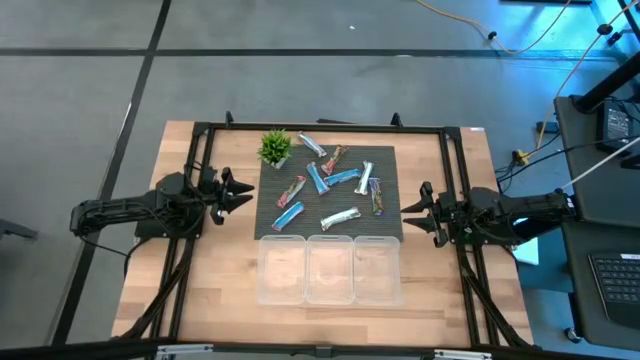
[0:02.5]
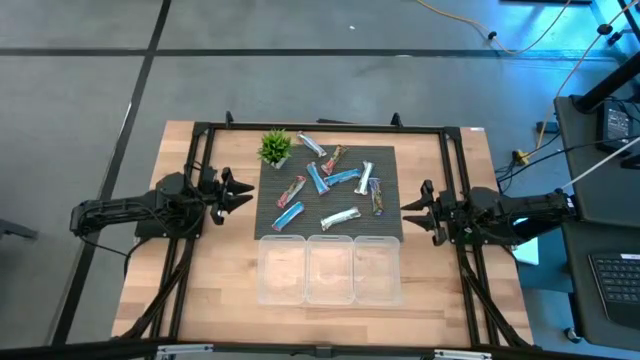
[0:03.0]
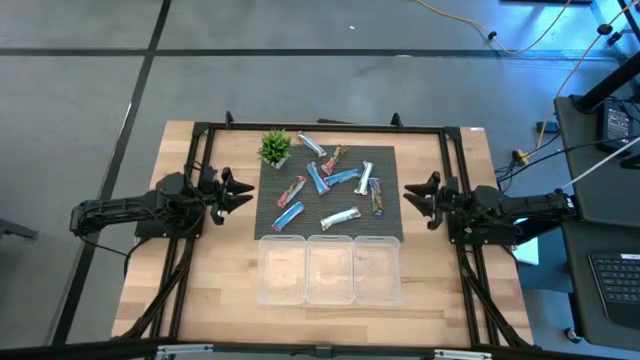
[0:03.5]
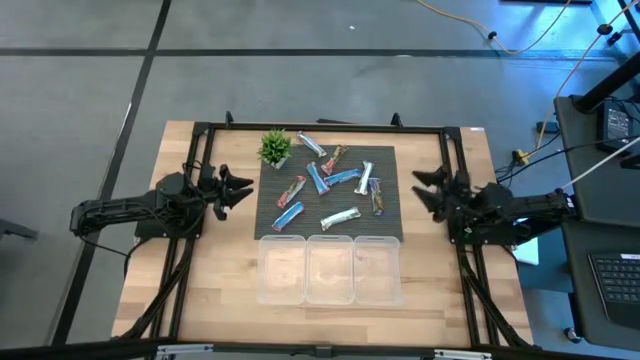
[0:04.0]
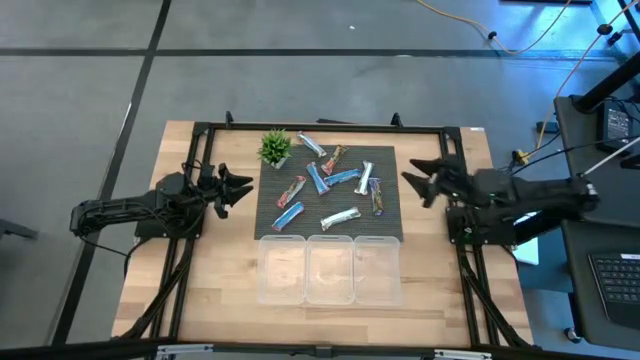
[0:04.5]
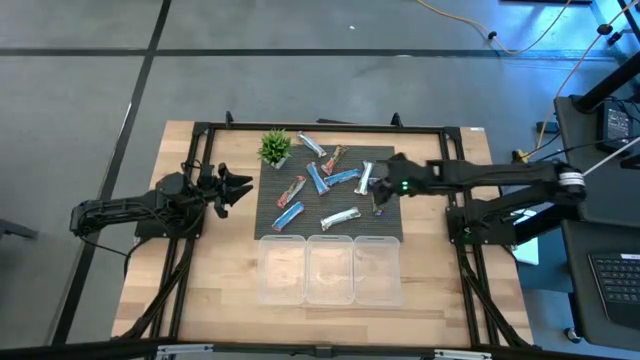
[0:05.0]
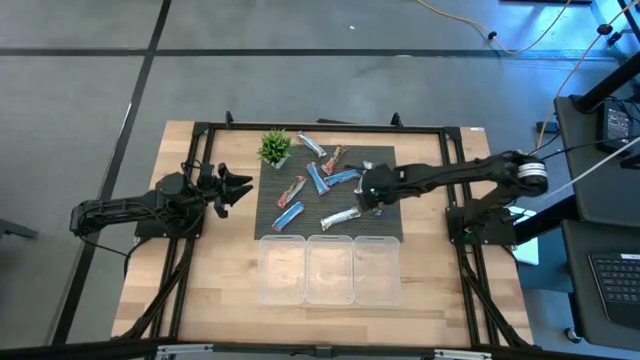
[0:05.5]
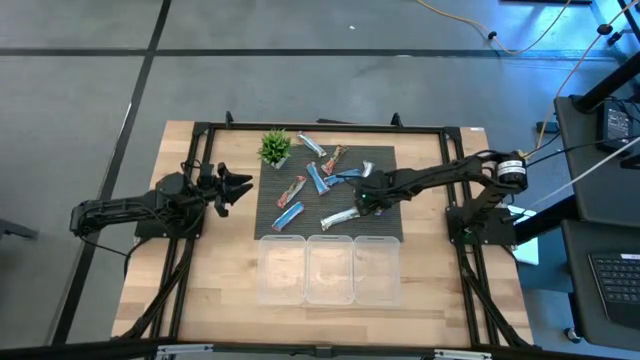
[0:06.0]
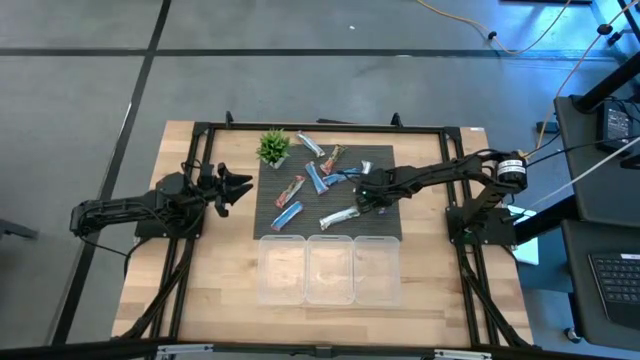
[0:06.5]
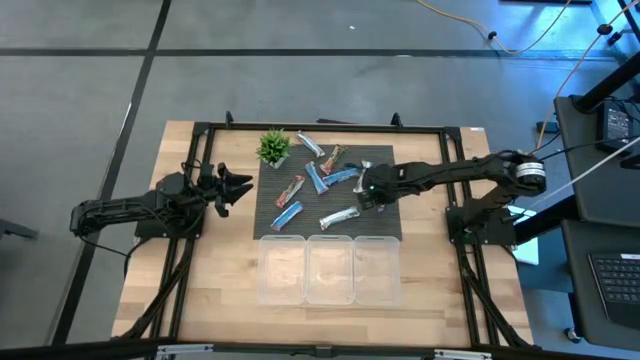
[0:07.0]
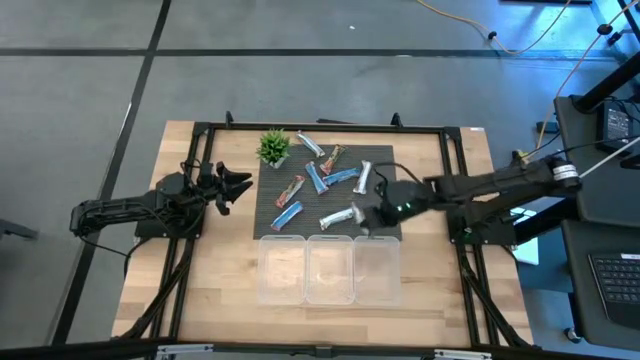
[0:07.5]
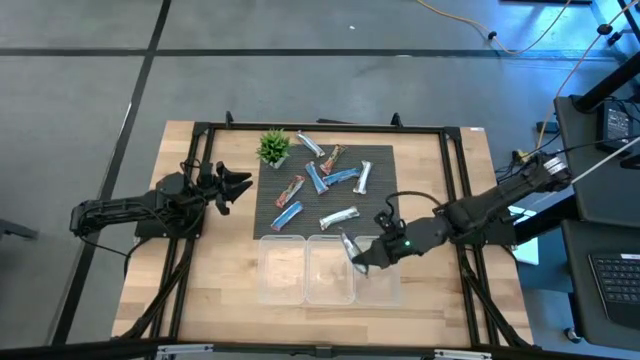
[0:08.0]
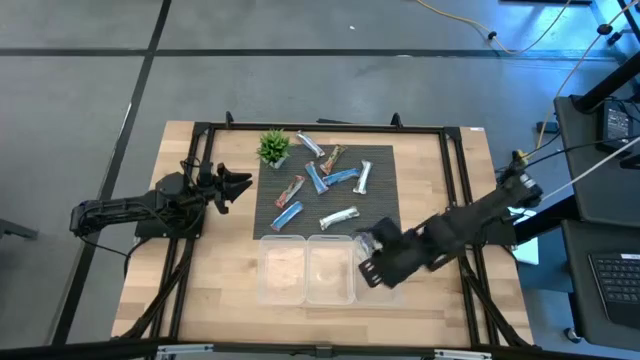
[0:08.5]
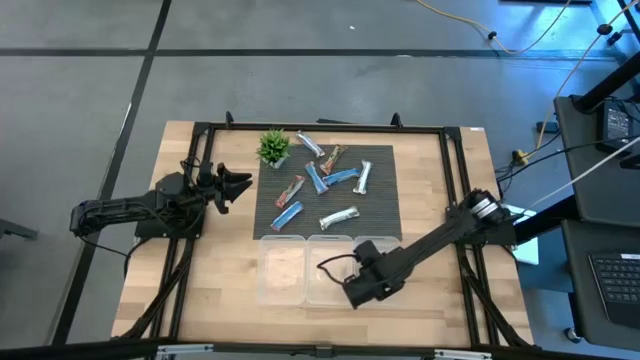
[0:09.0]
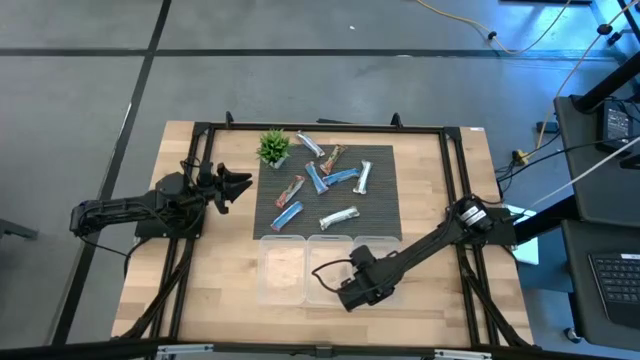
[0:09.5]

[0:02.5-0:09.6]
Task: Pick and place Granola Bars by type
Put the blue granola bar into the right transparent bin

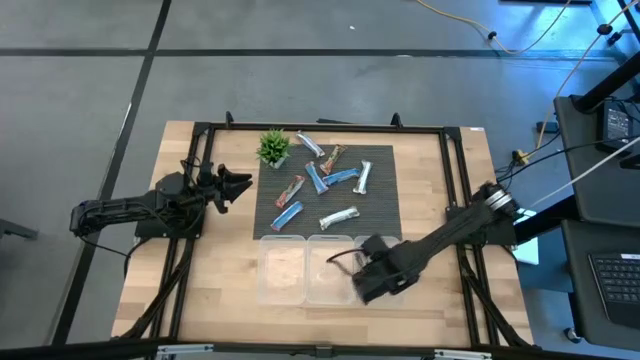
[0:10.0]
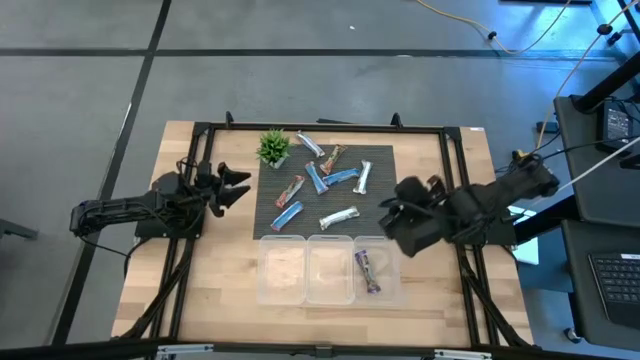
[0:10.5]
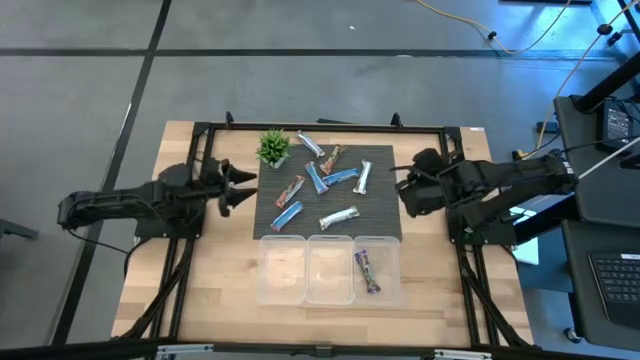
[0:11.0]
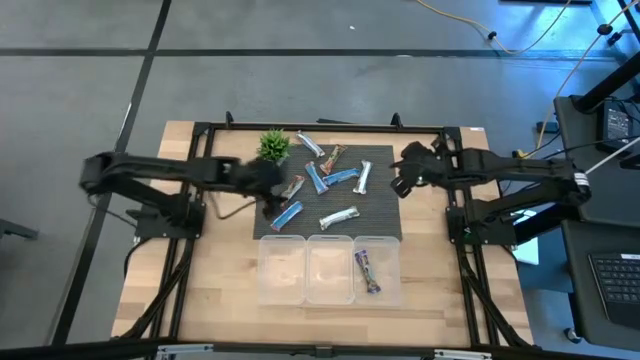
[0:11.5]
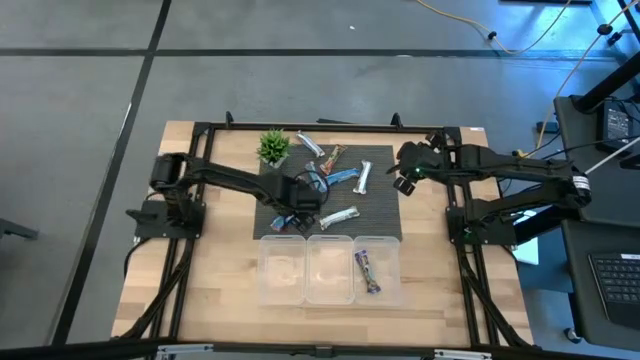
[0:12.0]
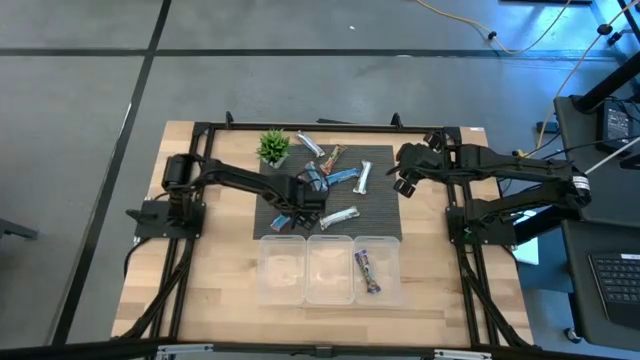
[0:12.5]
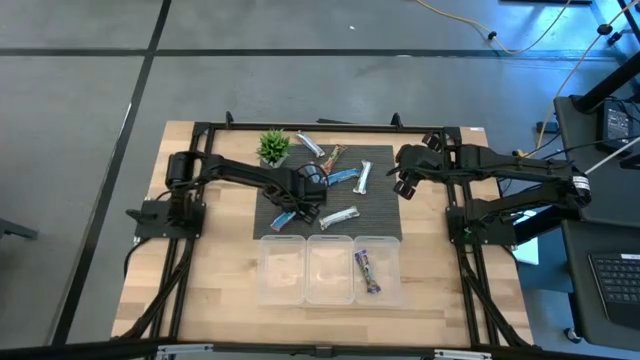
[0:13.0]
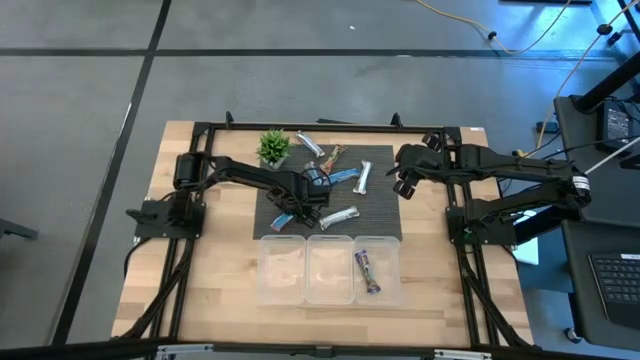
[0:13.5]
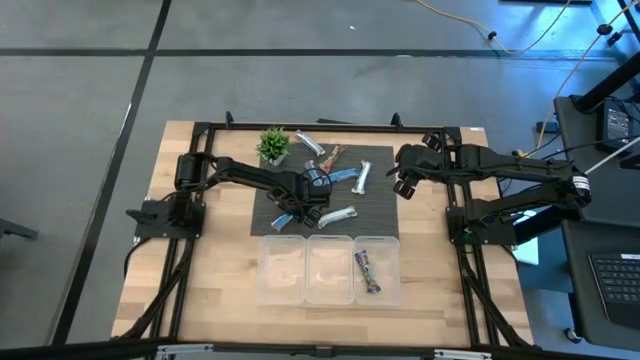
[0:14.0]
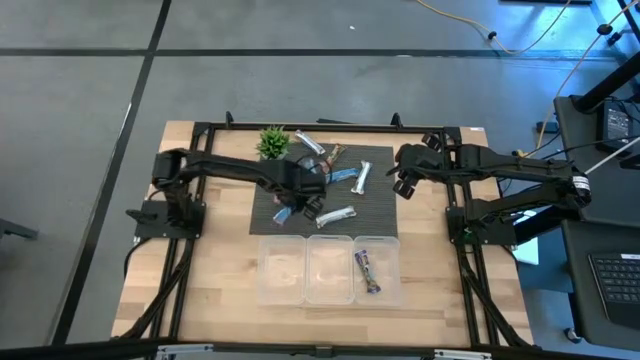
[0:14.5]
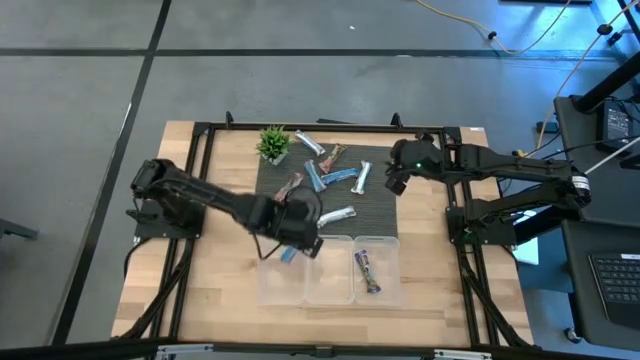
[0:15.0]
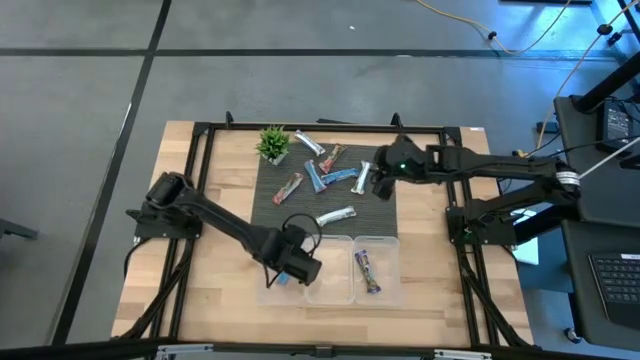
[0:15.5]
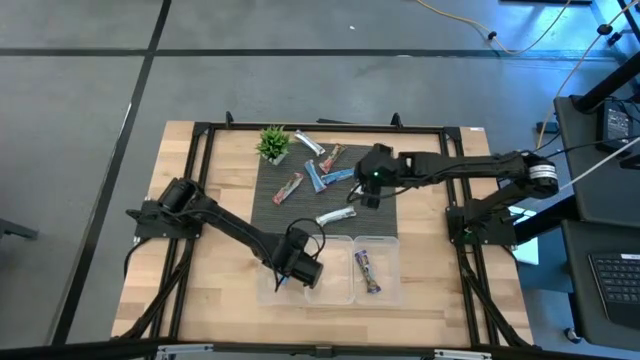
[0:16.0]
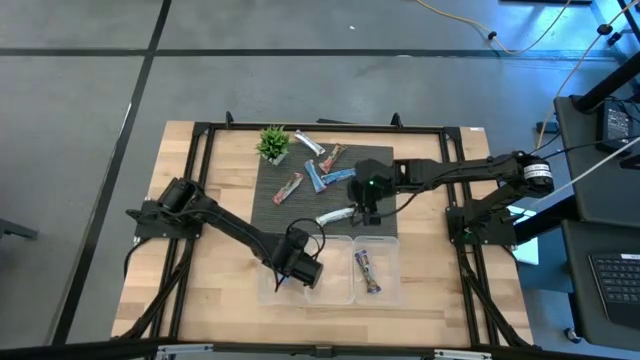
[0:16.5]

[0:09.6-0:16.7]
Put the red granola bar into the left transparent bin

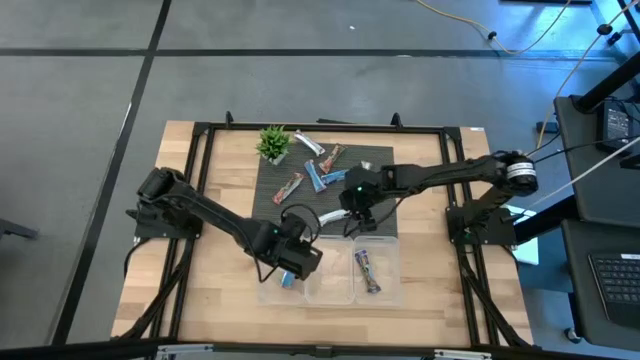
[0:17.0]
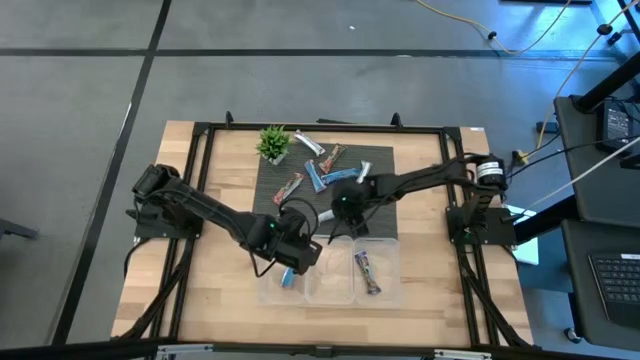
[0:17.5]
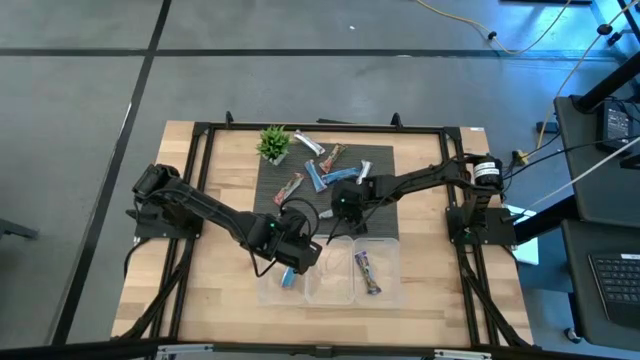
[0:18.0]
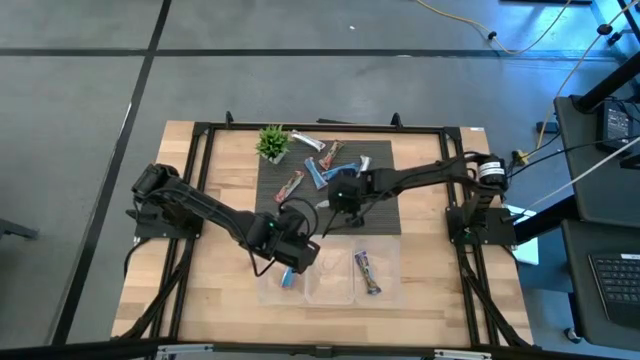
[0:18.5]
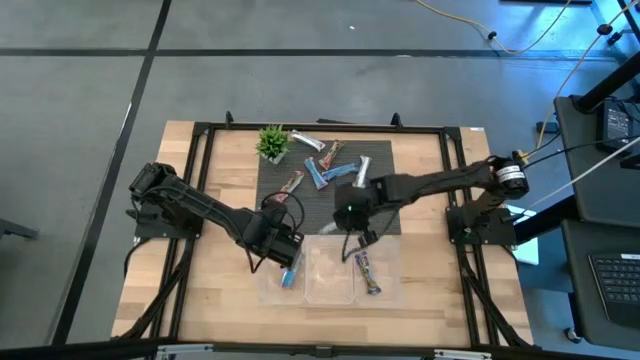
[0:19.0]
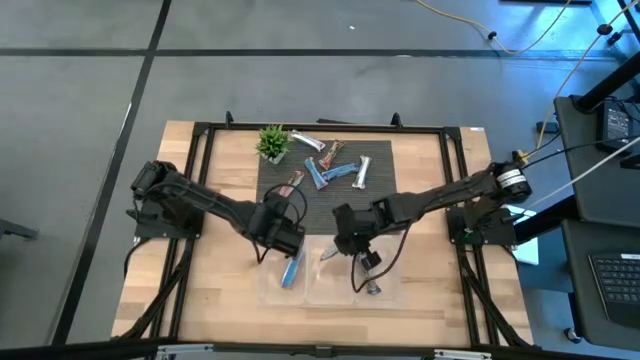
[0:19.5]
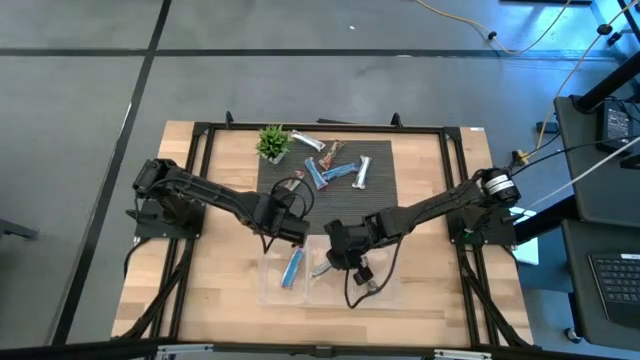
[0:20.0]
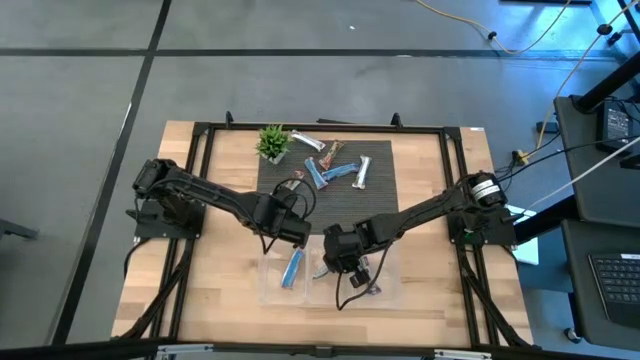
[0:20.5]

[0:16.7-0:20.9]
Put the yellow granola bar into the middle transparent bin

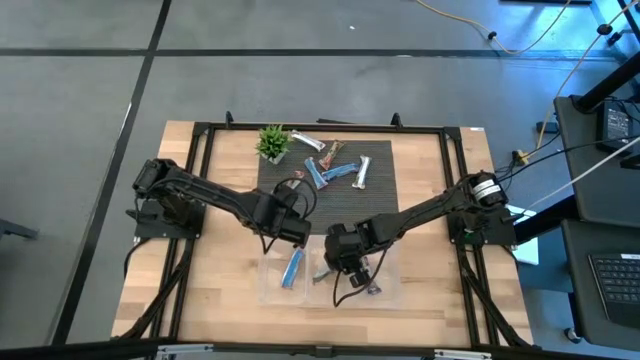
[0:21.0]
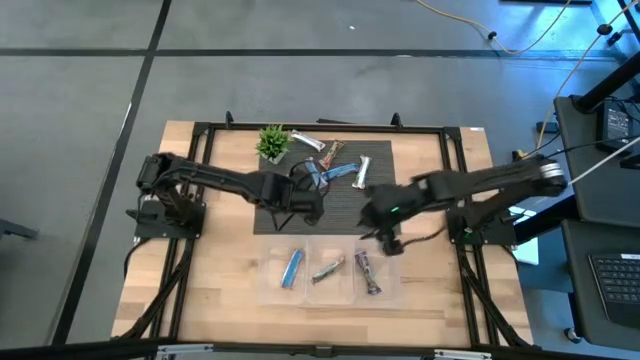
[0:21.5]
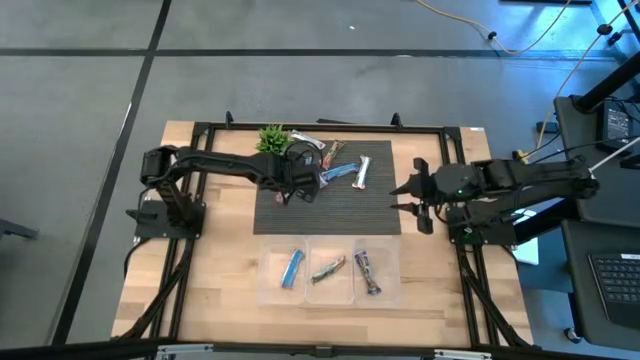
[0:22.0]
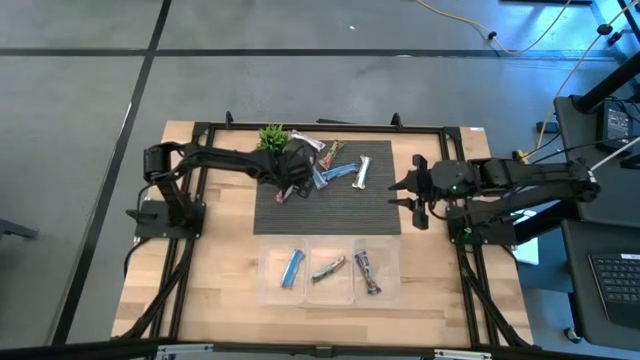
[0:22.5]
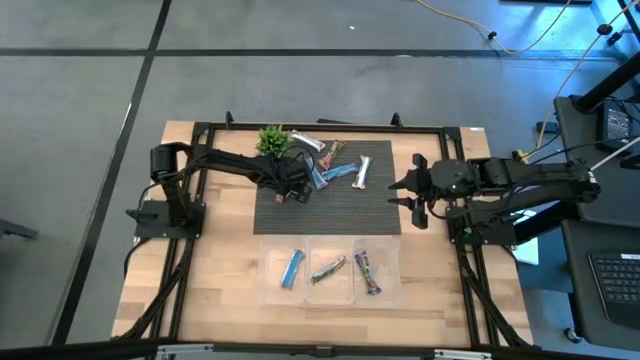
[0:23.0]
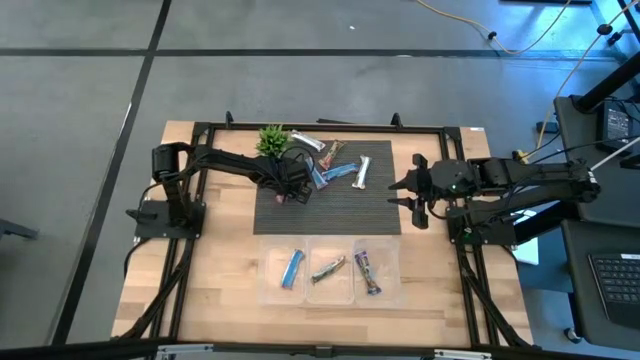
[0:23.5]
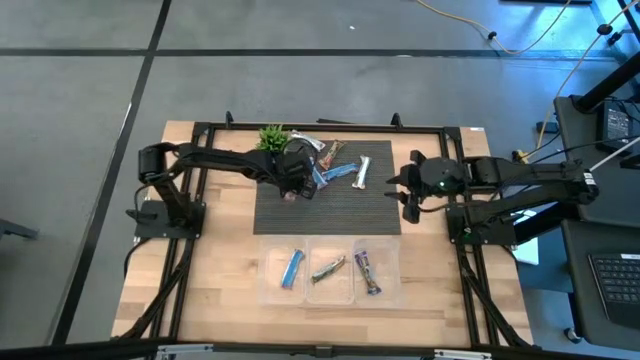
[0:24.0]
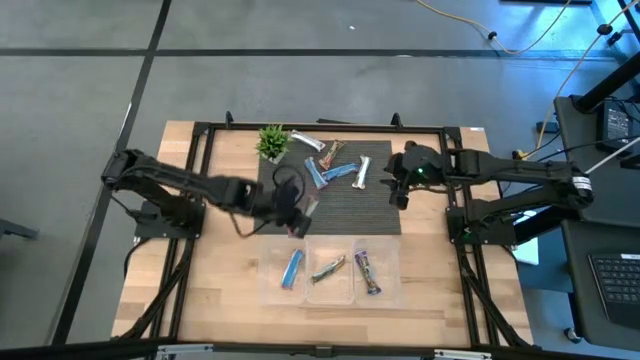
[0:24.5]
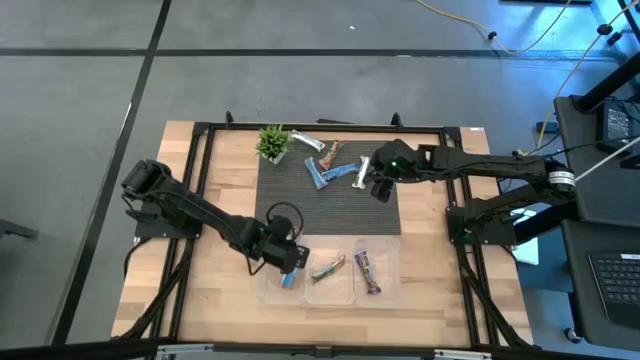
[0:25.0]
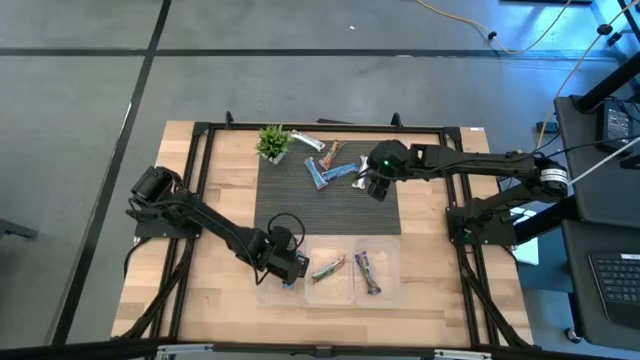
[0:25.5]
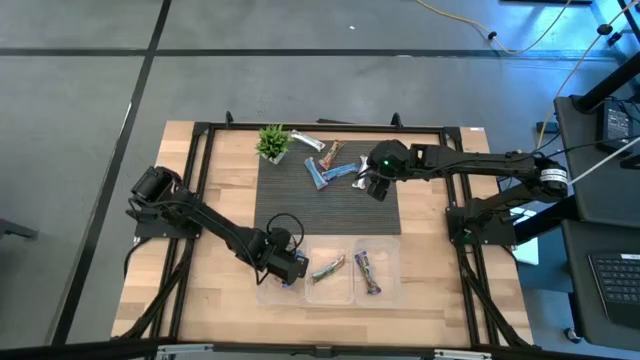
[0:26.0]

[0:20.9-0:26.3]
Put the red granola bar into the left transparent bin
